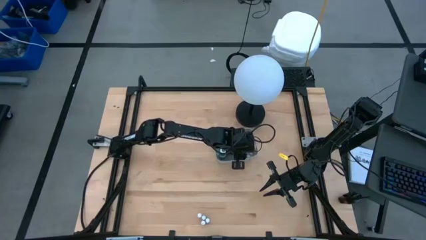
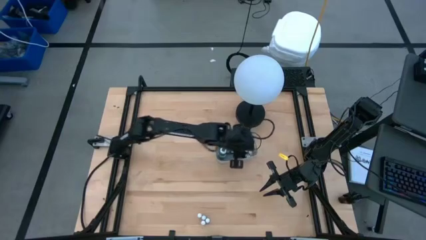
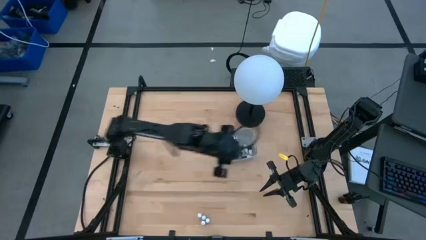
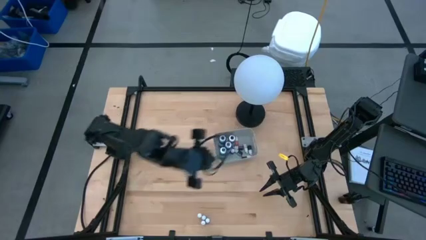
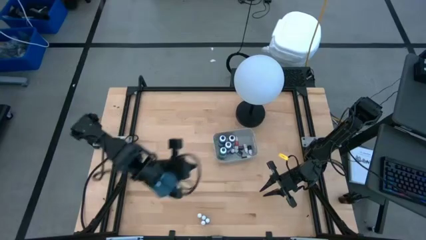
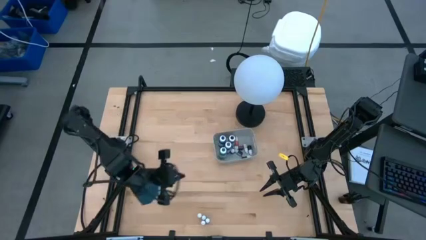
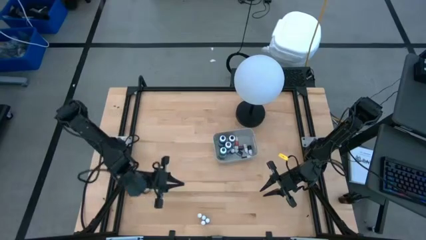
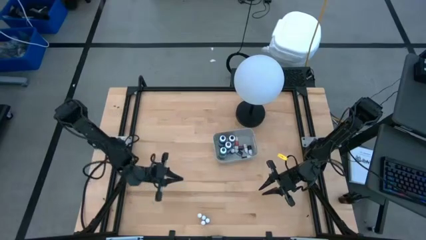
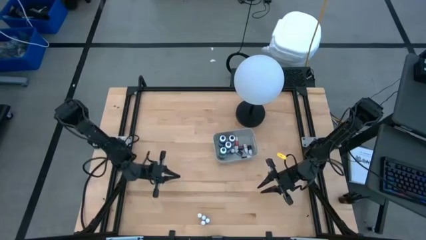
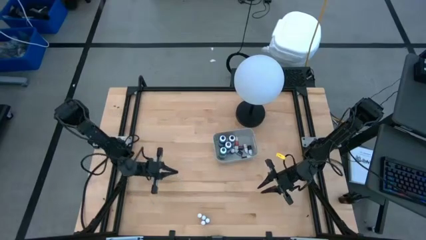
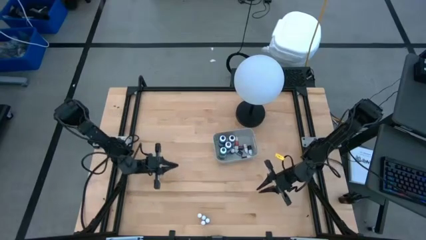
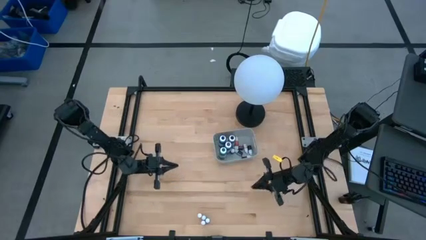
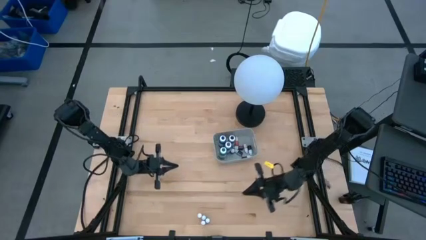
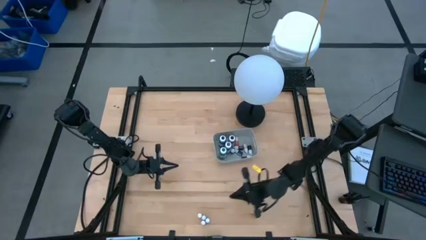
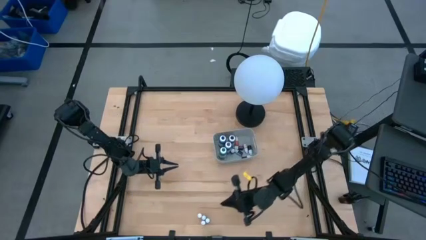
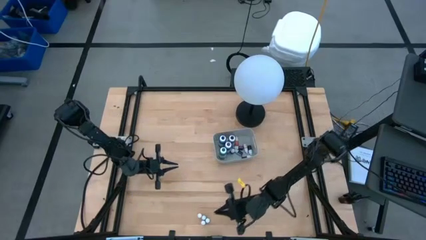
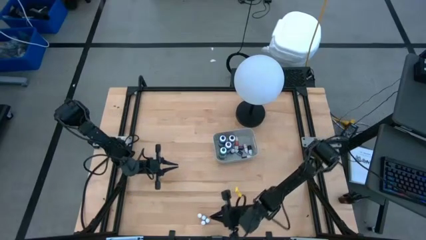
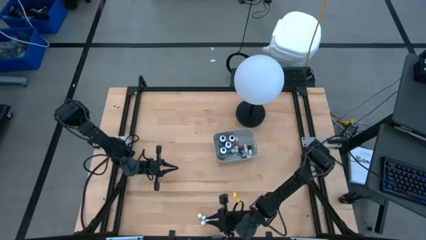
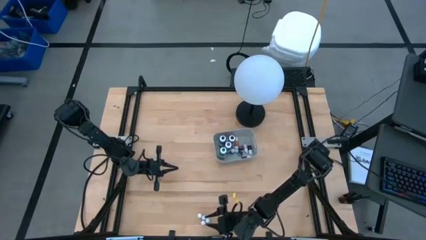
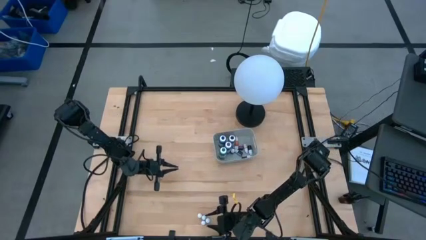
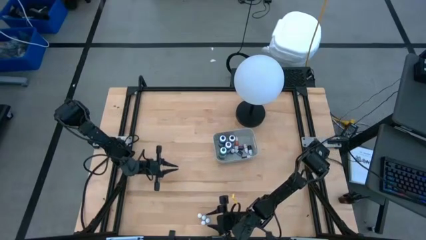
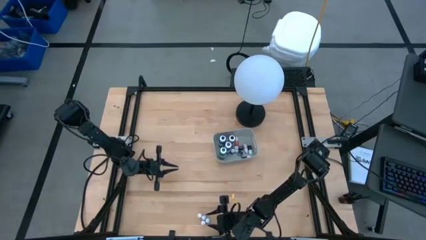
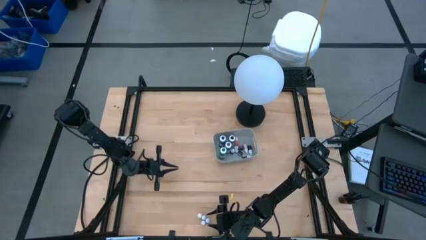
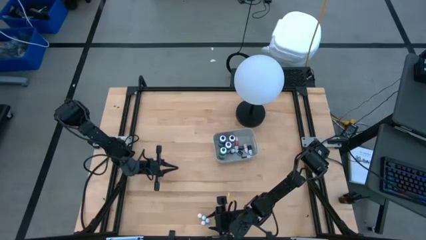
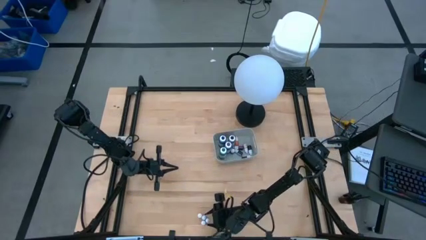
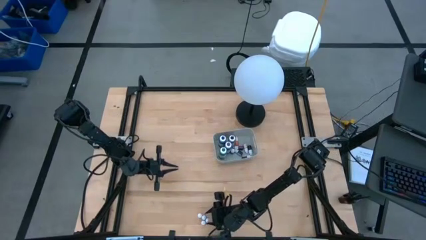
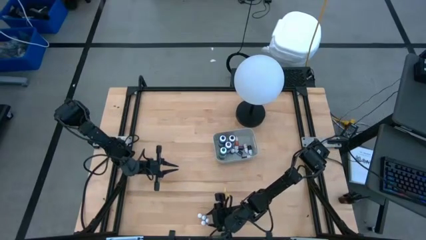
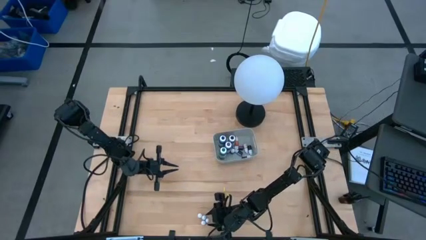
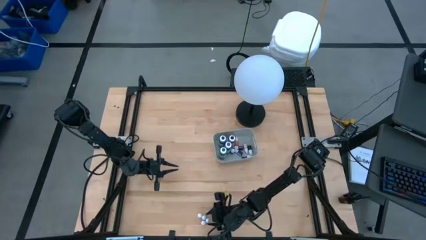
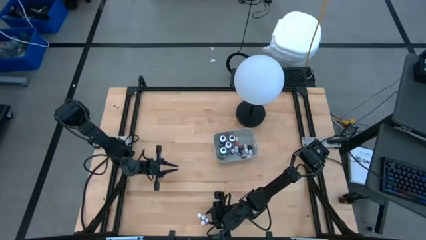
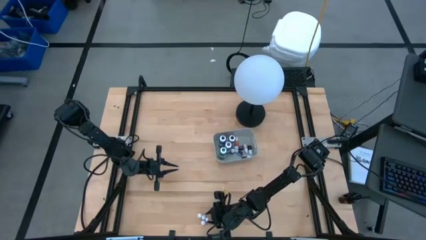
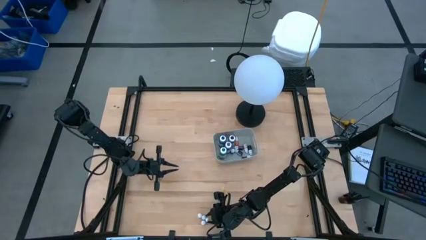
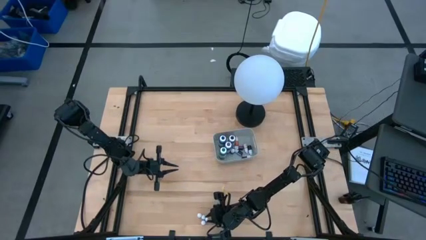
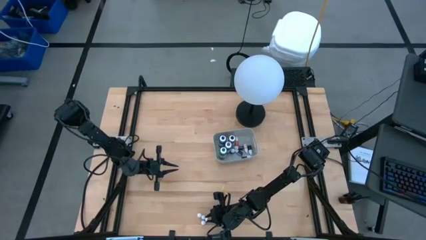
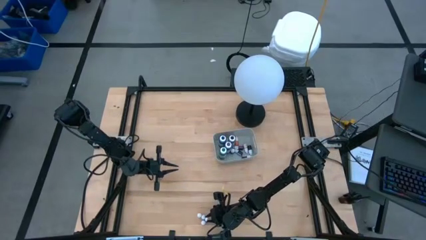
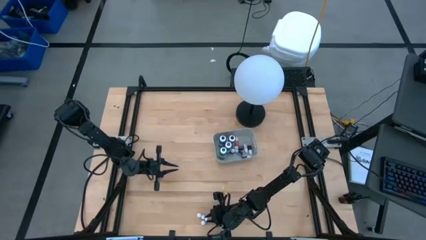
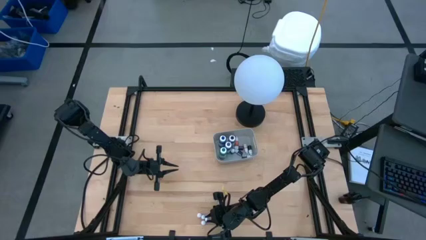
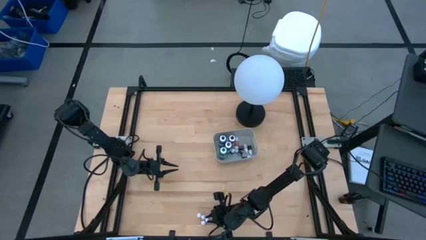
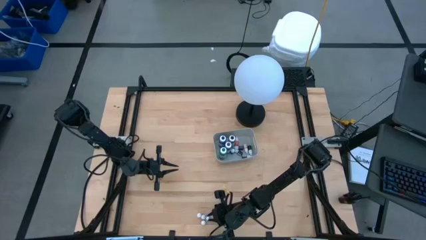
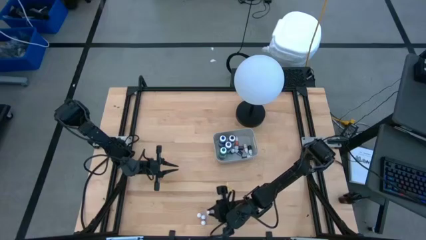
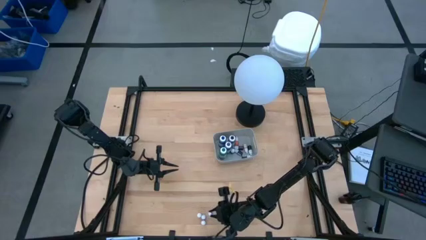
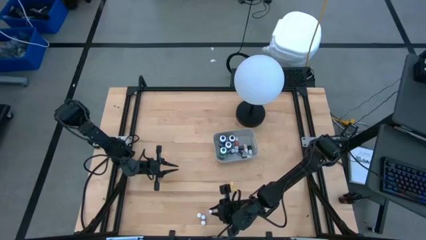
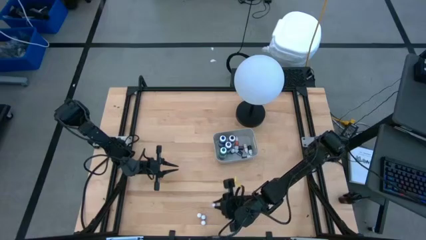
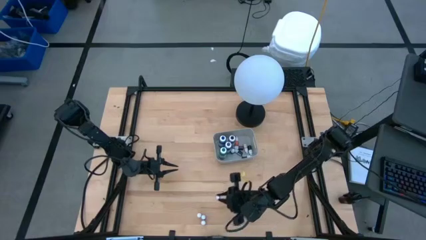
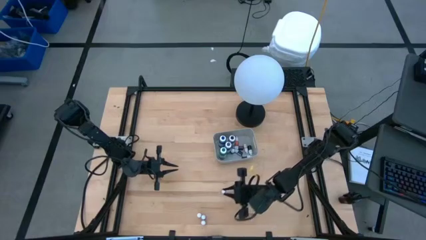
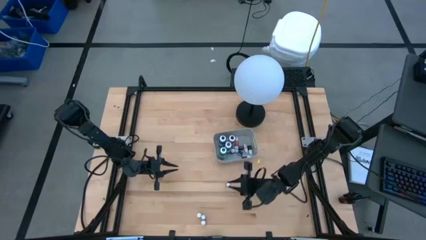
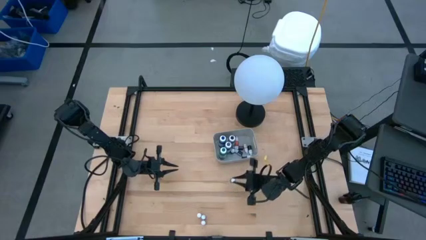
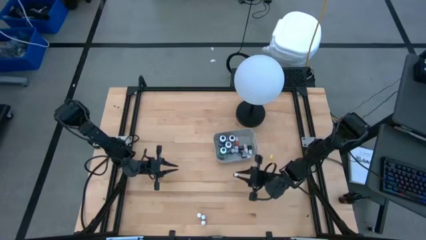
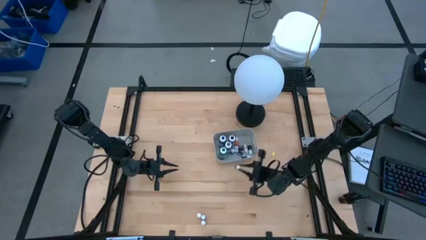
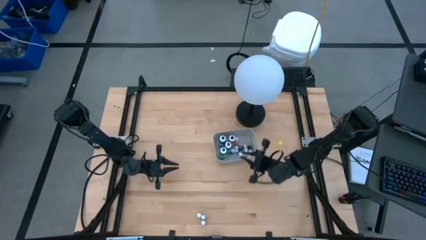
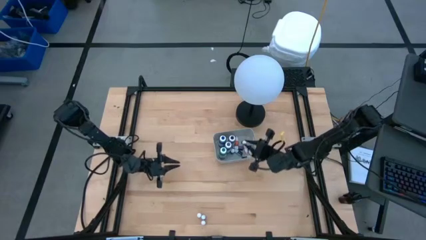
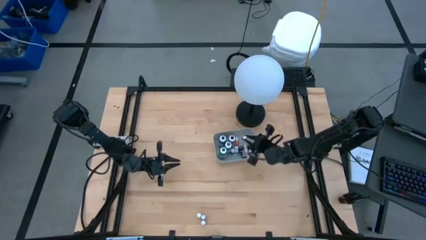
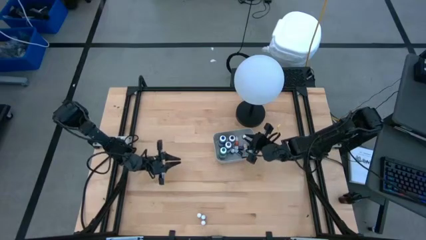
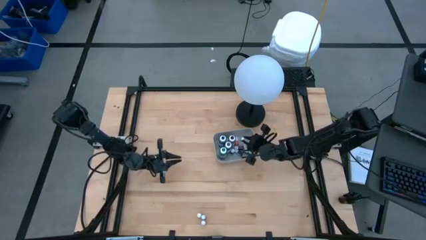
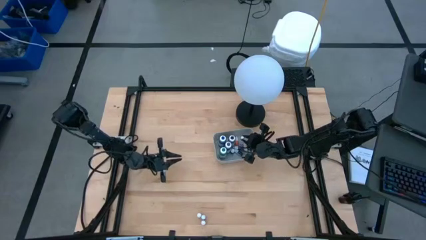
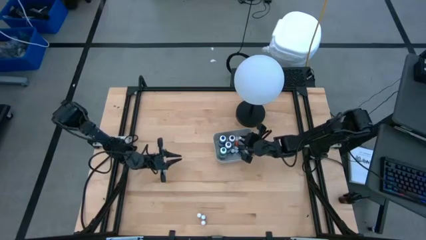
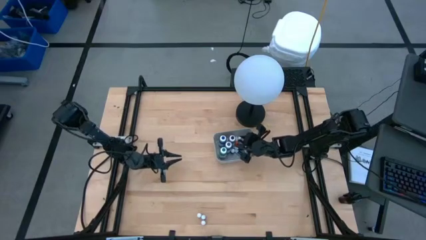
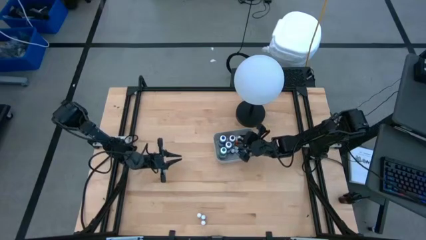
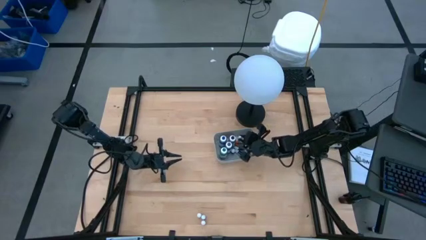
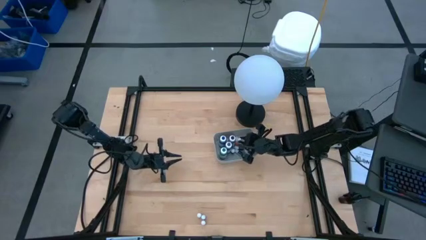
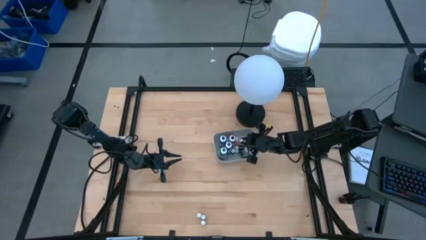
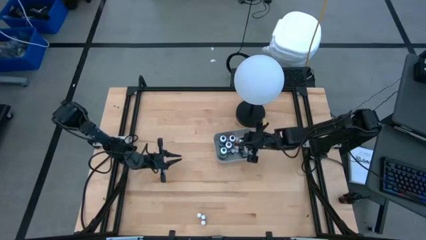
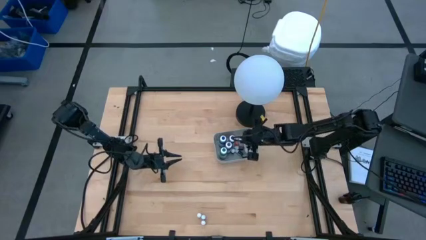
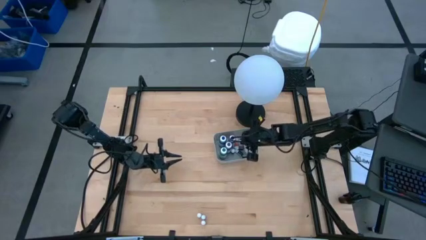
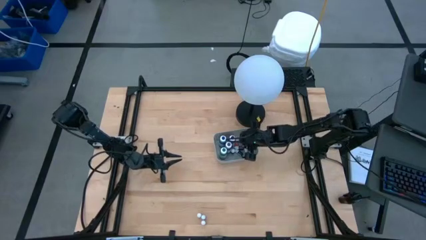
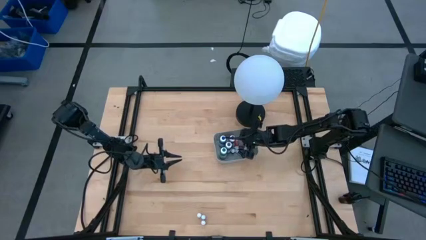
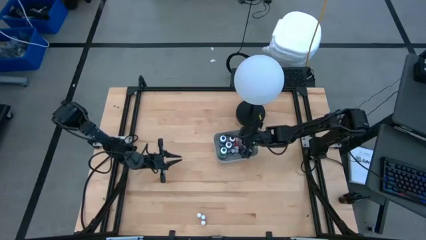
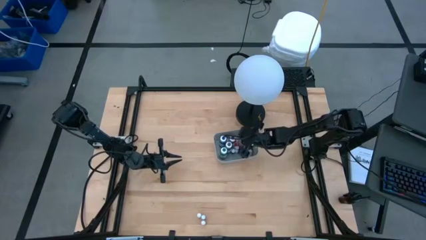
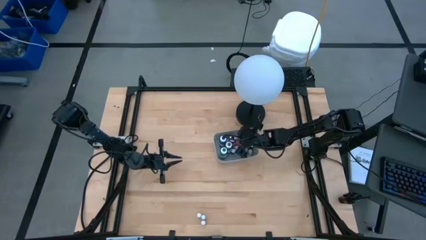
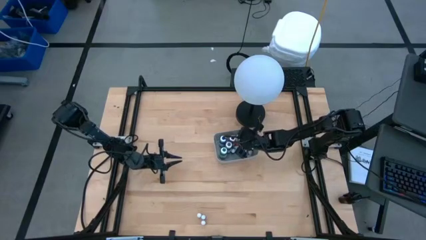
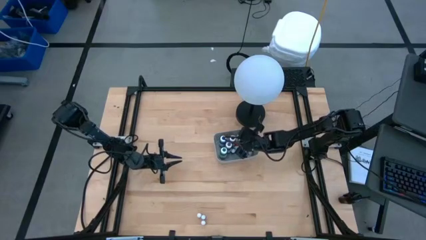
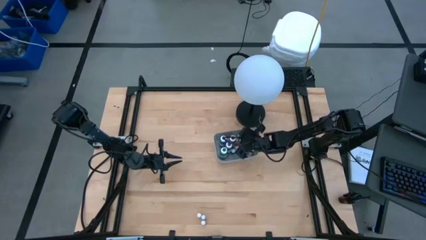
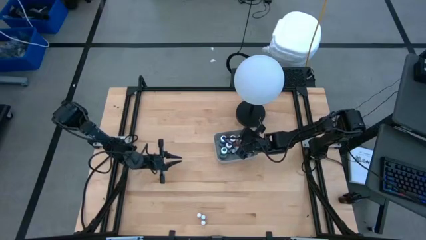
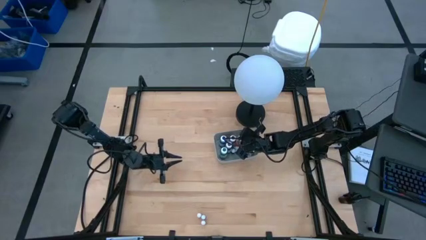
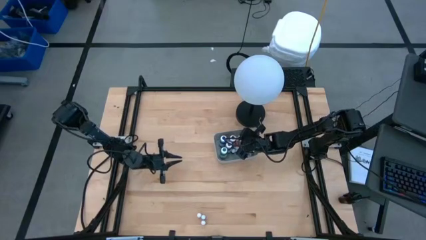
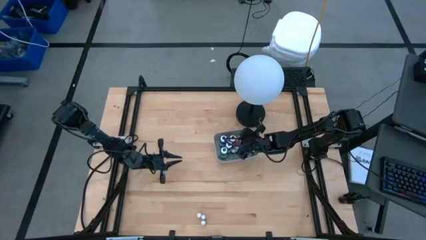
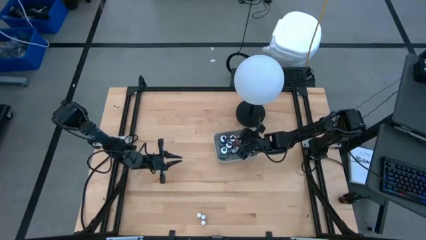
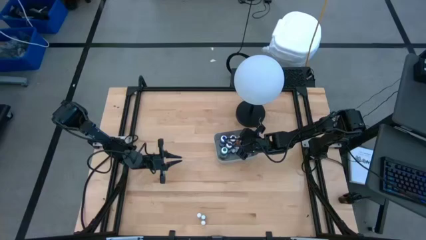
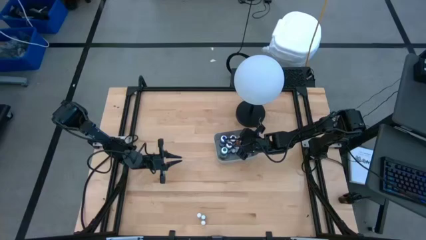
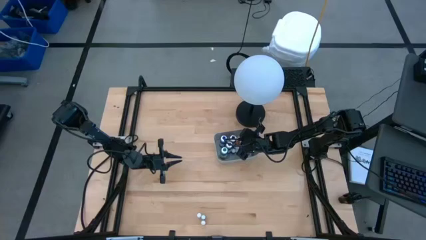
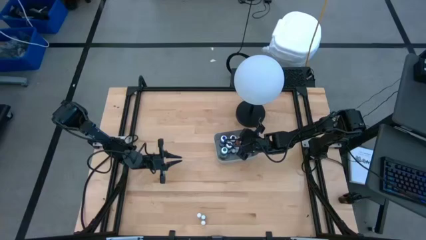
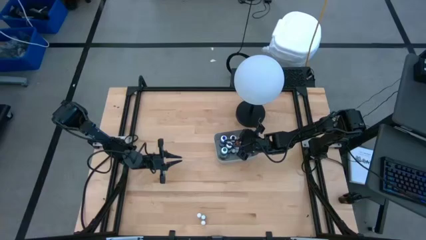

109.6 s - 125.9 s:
Task: Pick & Place food coloring
Put the red food coloring bottle into the gray bin
